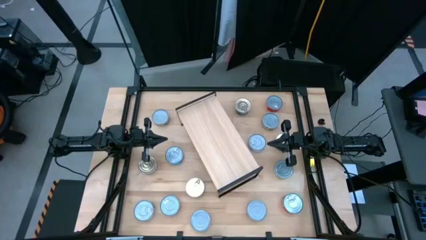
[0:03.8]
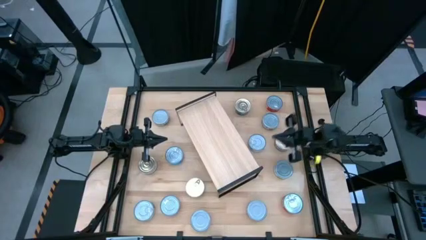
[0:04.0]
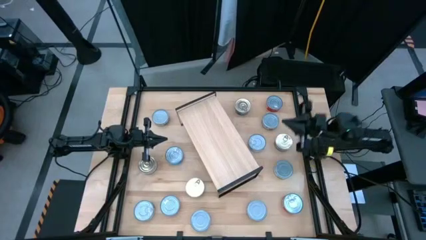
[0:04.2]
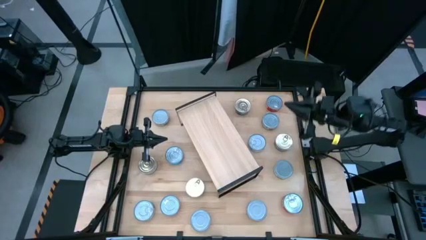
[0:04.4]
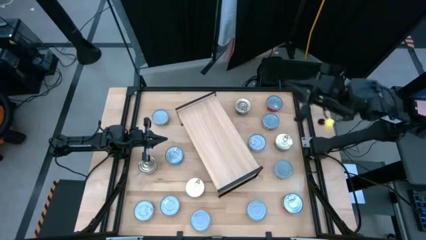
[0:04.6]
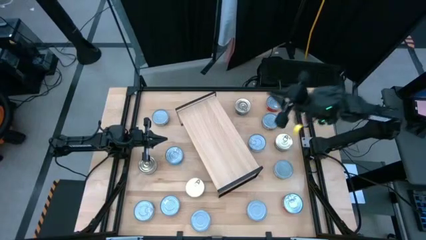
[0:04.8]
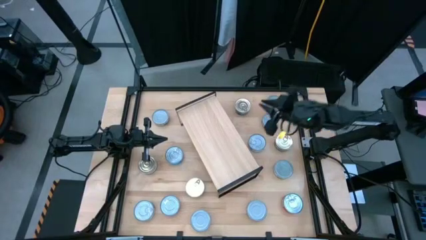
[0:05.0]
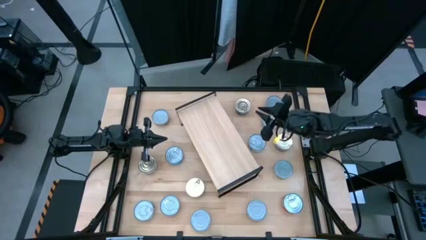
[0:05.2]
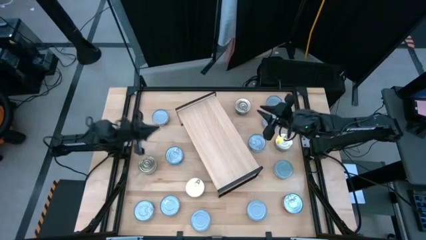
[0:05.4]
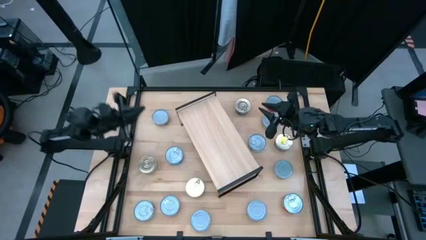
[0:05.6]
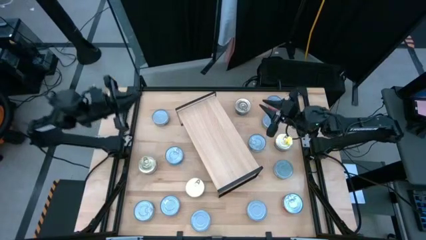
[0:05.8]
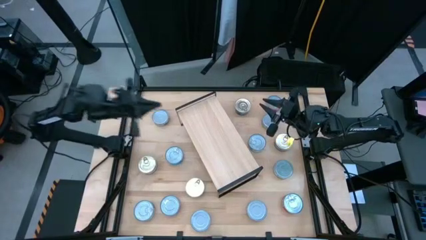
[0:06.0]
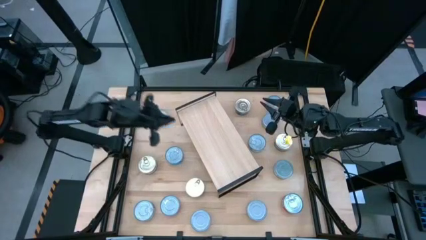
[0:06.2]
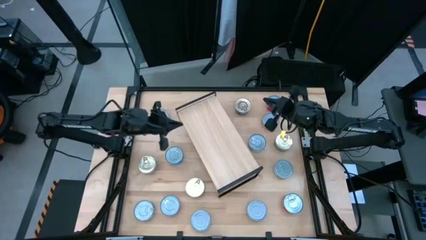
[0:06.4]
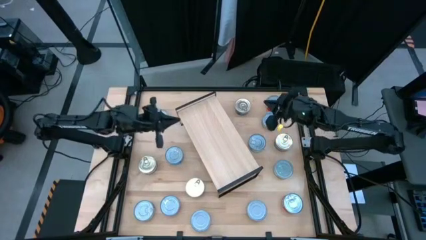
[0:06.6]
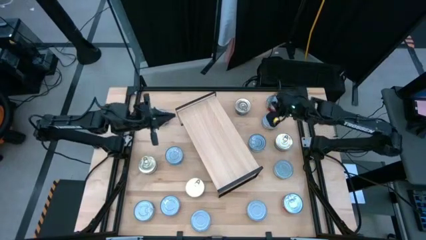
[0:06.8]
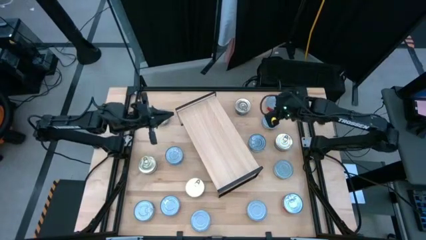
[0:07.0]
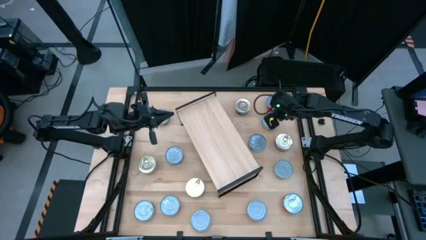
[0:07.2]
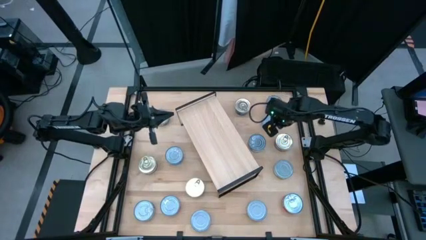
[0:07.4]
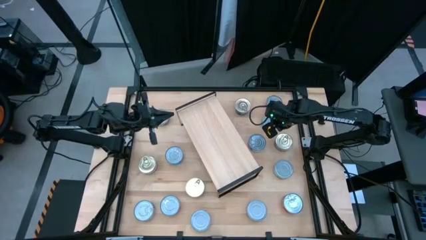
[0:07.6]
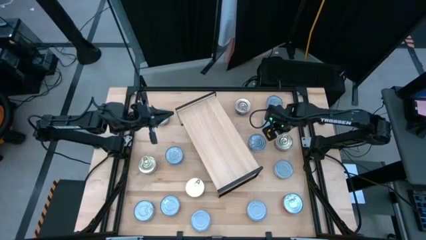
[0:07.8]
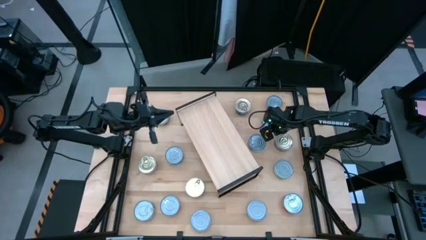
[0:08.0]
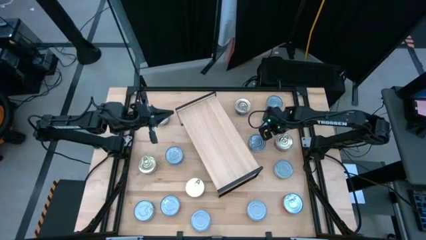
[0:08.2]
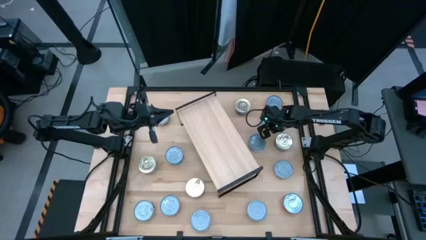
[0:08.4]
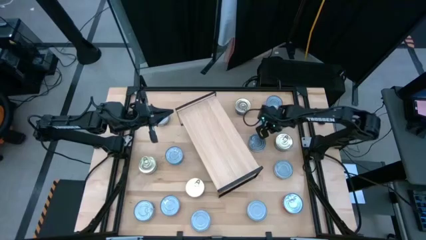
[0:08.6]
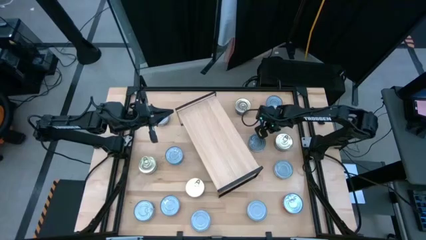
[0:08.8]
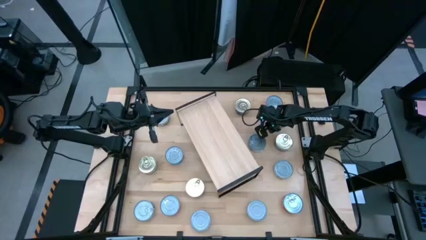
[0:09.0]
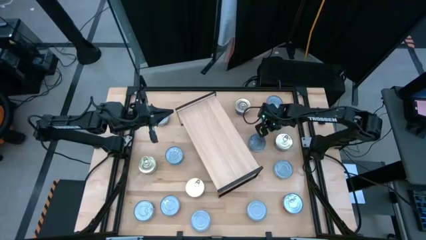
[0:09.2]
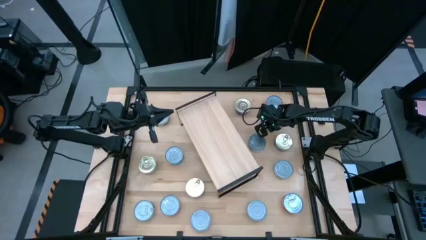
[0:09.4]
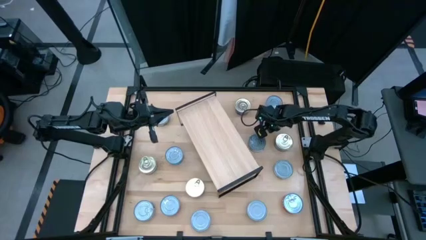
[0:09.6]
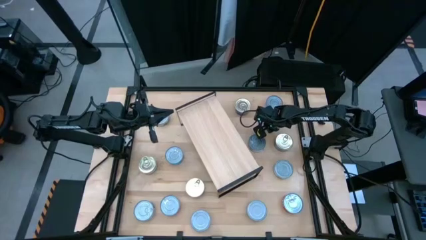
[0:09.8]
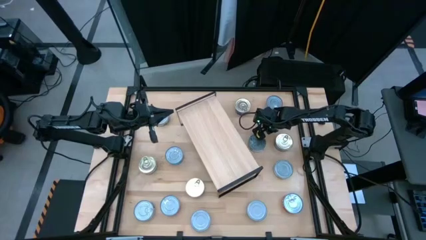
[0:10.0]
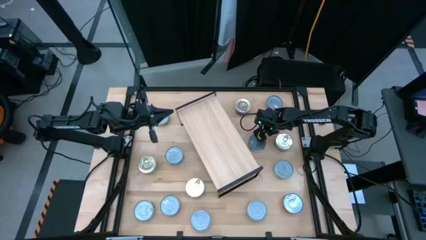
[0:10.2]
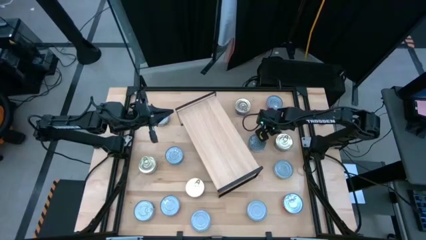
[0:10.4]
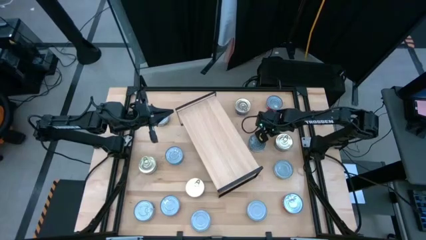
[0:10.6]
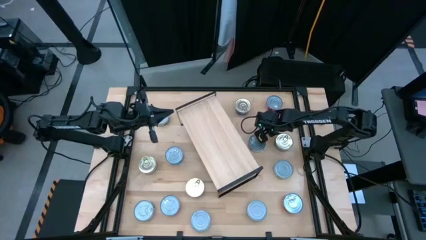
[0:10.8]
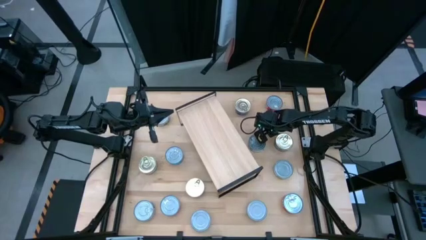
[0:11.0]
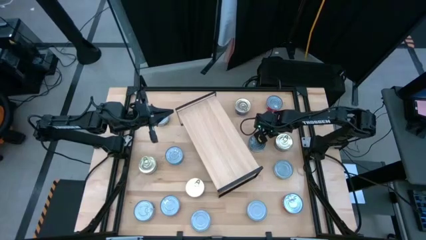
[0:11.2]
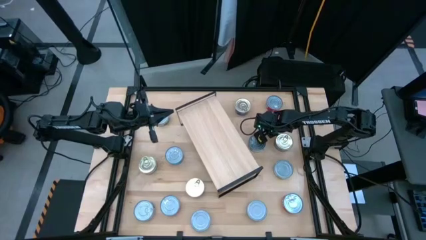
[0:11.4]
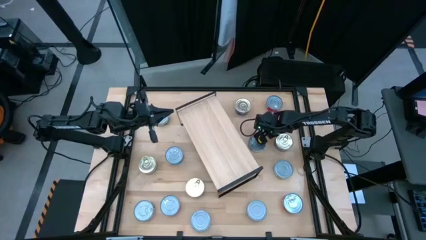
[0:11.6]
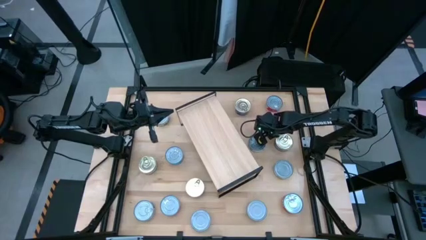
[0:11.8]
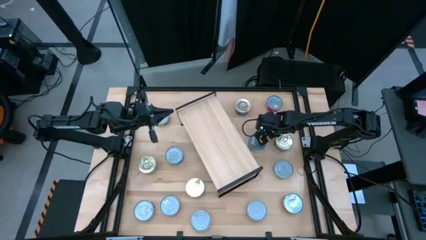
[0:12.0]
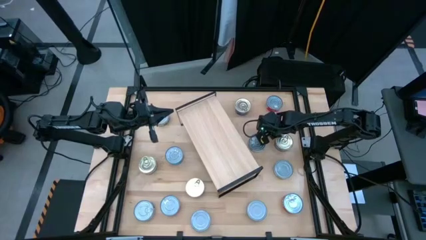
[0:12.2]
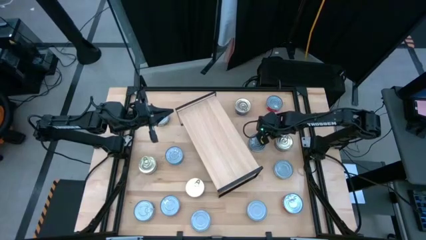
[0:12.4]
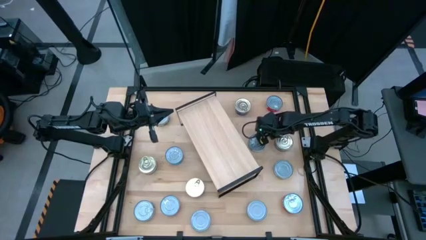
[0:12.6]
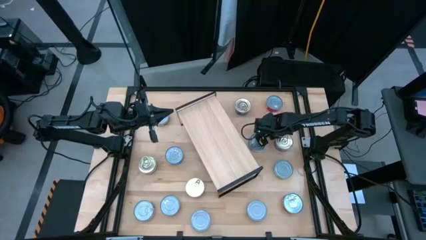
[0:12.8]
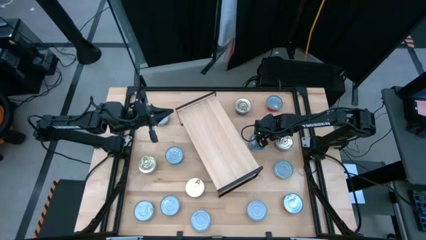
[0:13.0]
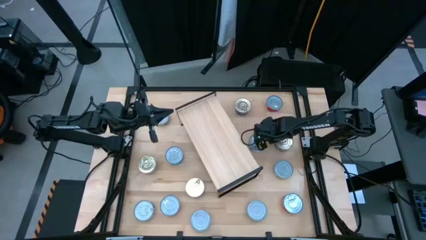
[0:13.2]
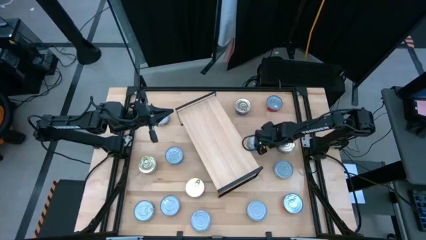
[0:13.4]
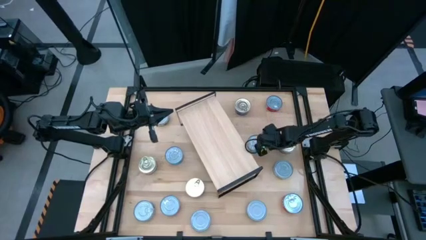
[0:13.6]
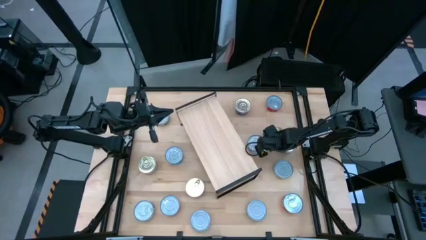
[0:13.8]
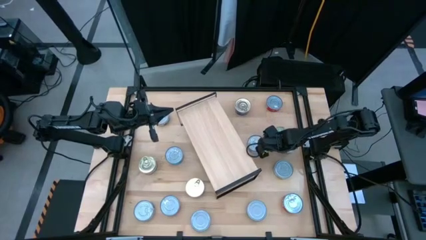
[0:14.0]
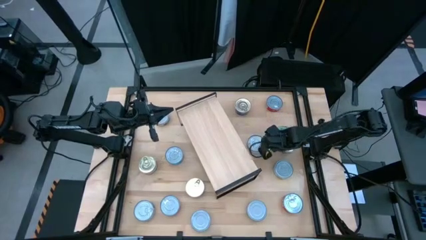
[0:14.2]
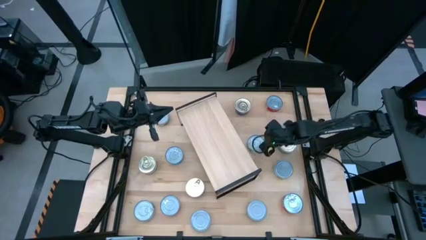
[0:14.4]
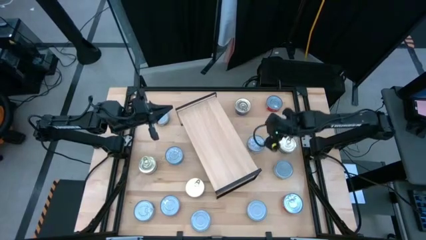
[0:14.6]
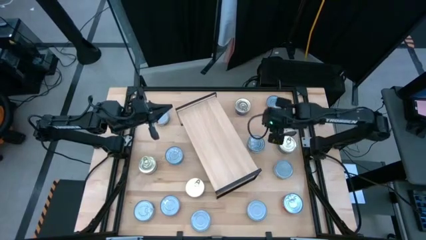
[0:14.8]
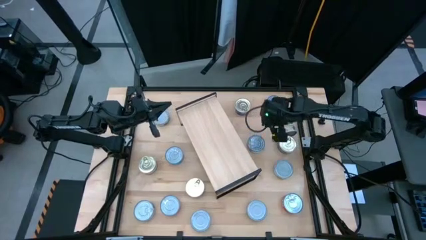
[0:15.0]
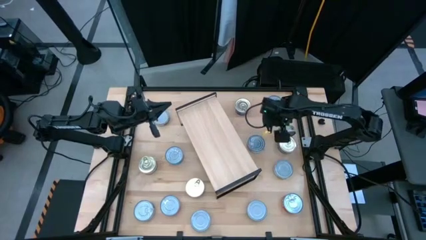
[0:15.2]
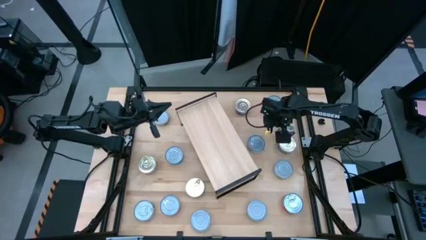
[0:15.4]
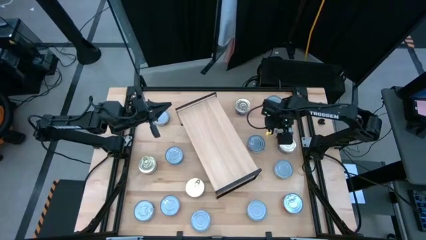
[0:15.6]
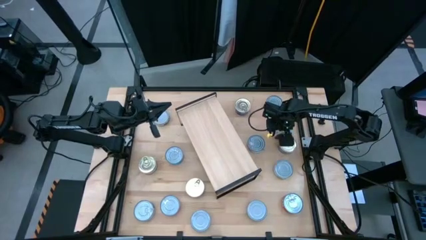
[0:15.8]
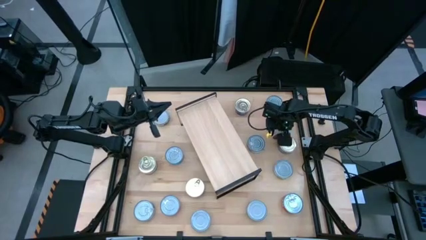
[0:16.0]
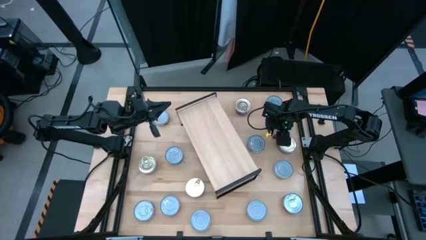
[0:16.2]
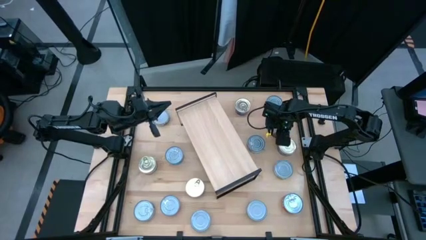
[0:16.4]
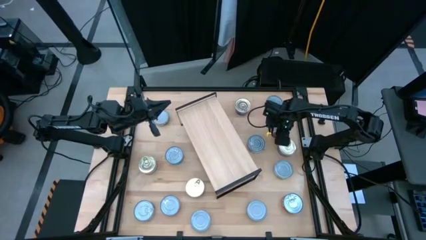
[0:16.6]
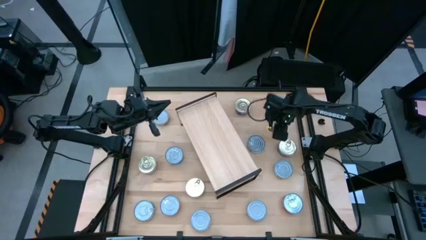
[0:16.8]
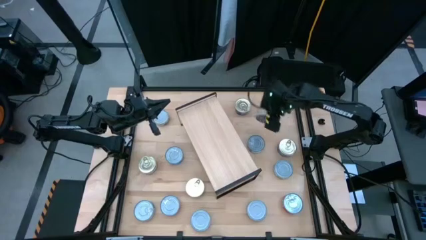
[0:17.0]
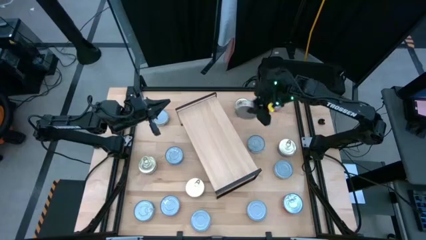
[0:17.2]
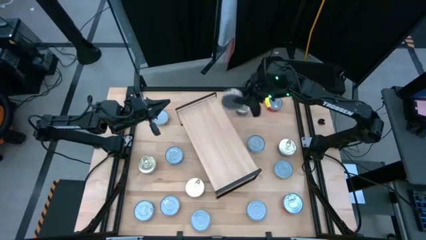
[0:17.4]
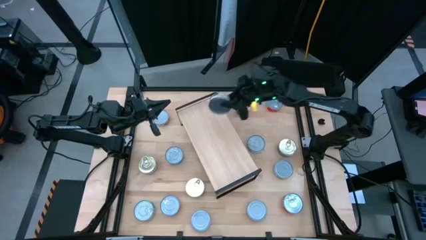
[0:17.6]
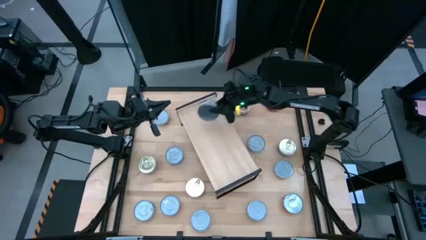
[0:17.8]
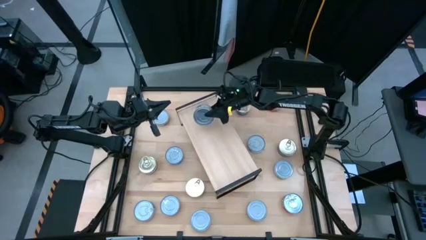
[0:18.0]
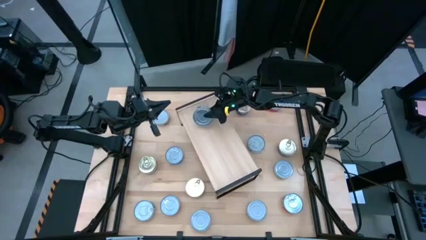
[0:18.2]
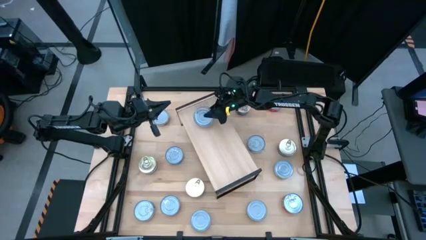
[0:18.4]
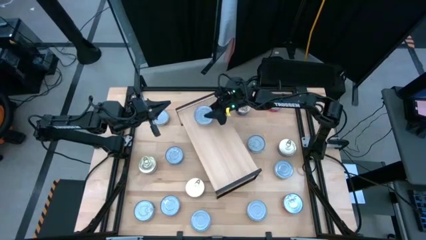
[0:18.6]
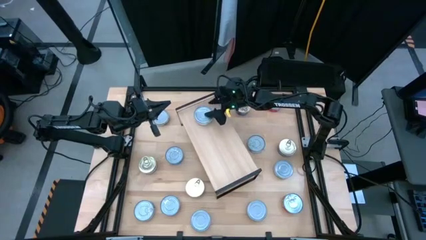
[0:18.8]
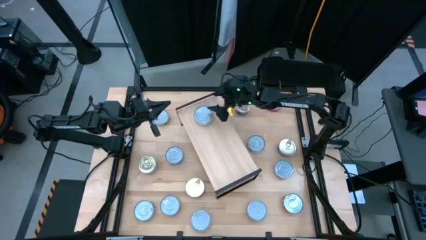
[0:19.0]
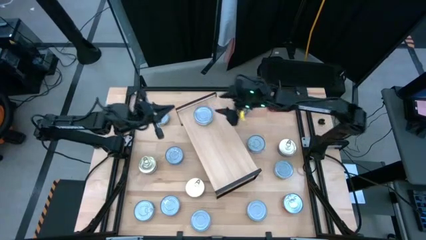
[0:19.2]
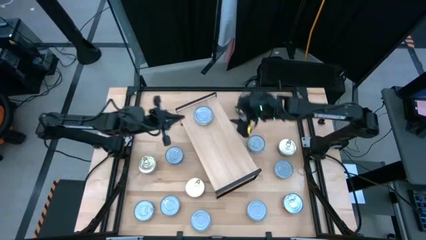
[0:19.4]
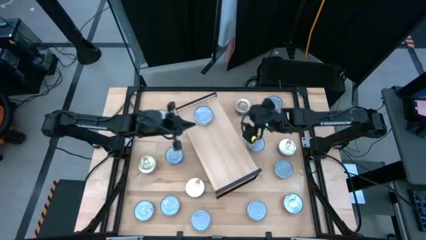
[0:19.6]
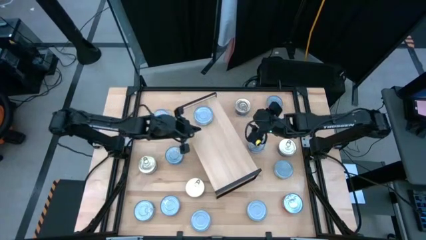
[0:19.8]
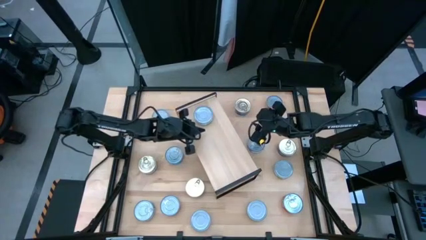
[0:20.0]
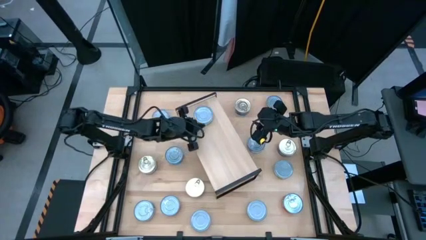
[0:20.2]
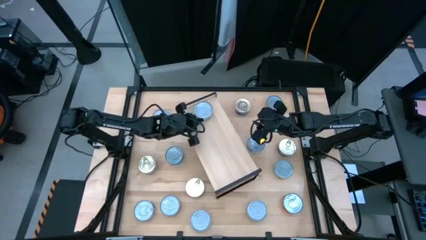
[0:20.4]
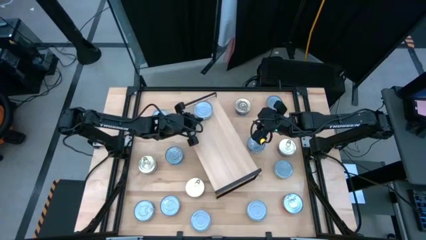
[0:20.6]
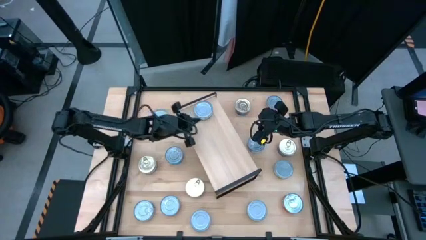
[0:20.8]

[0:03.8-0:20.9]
Task: Stack canned seafood by type on shelf
Put the right green tuna can on the shelf
